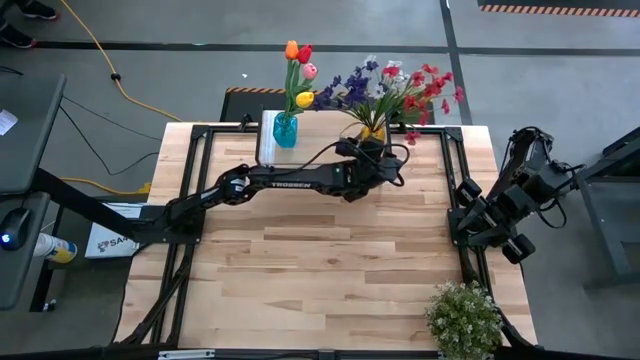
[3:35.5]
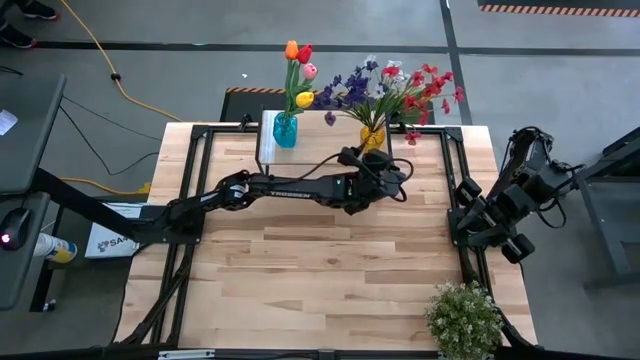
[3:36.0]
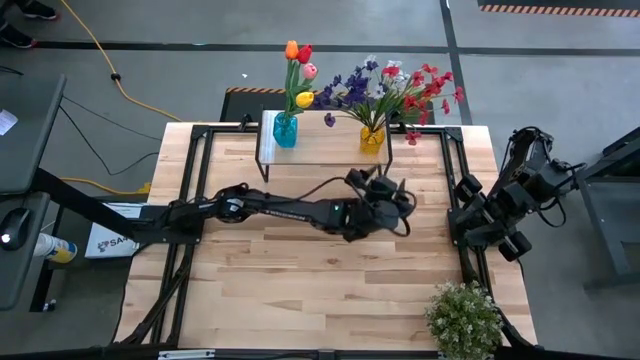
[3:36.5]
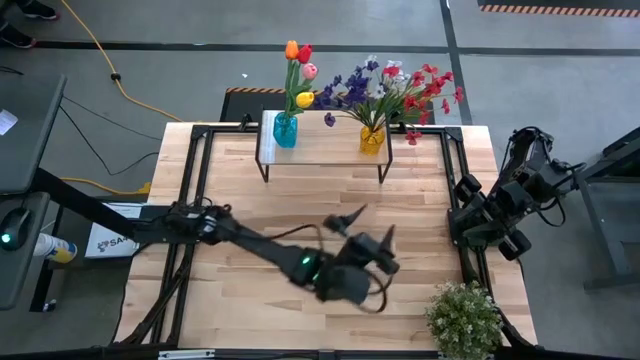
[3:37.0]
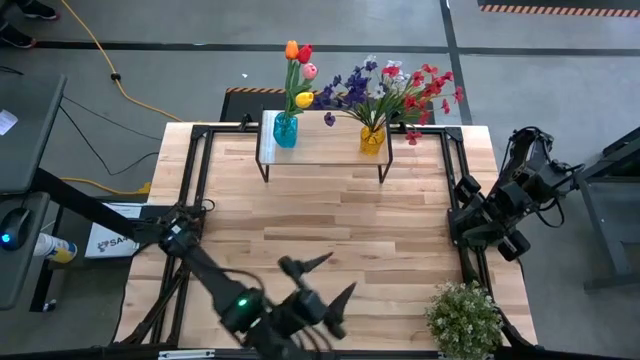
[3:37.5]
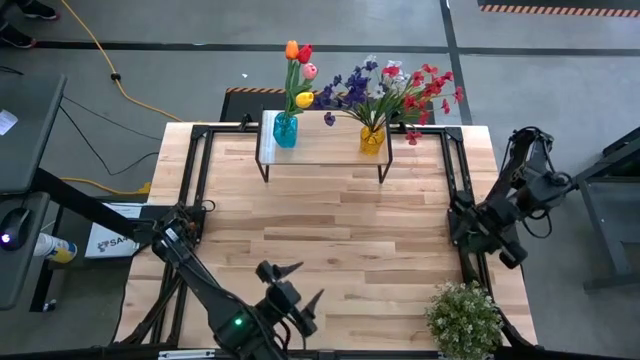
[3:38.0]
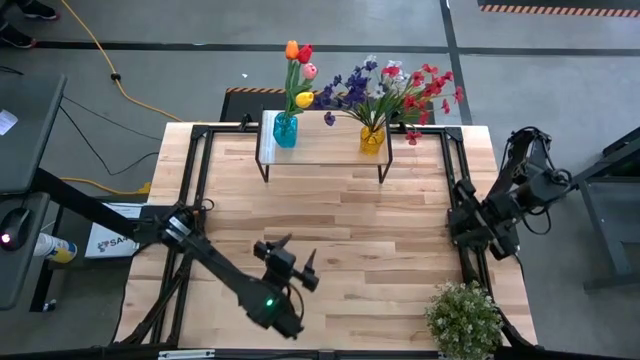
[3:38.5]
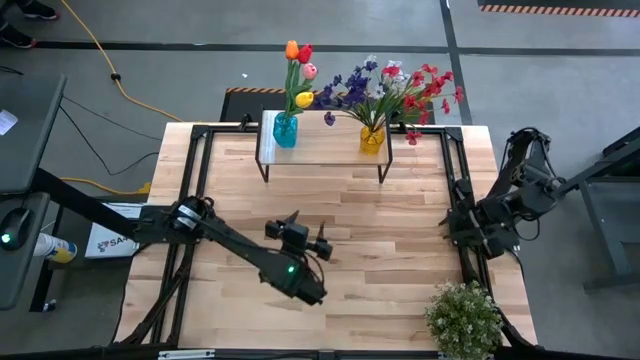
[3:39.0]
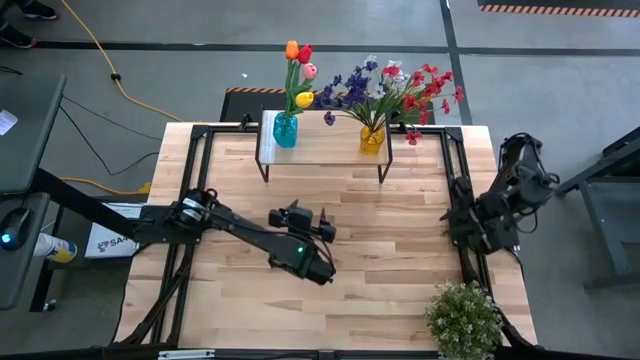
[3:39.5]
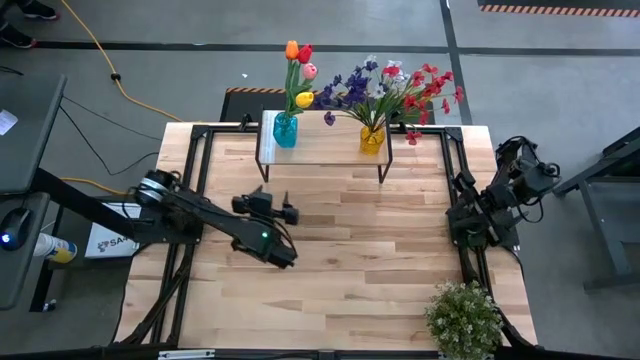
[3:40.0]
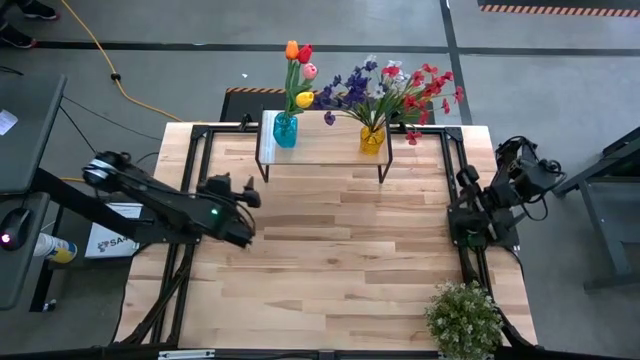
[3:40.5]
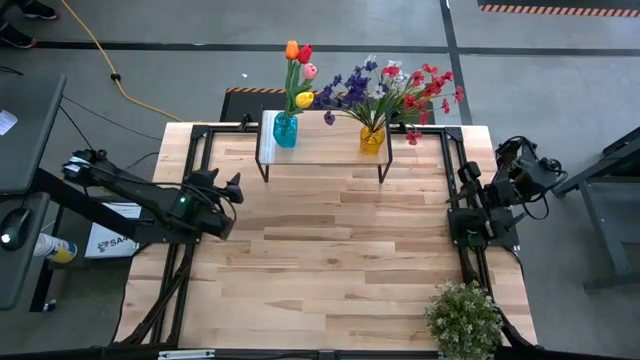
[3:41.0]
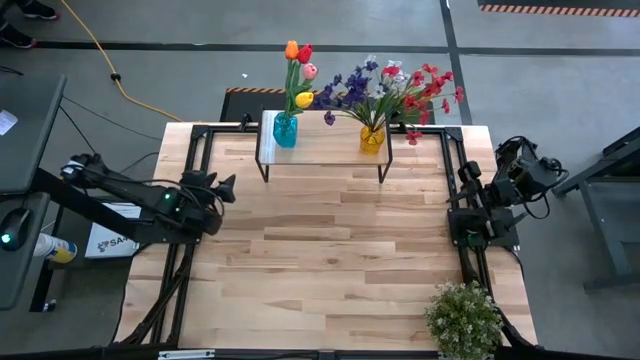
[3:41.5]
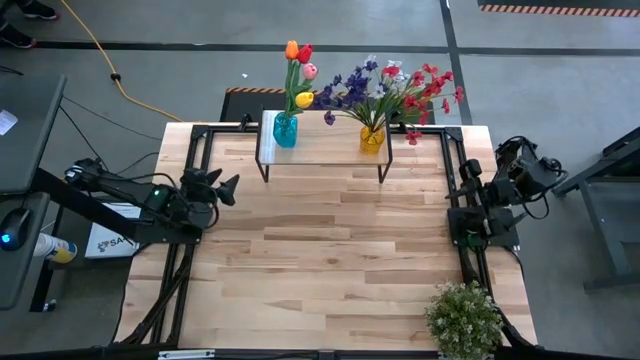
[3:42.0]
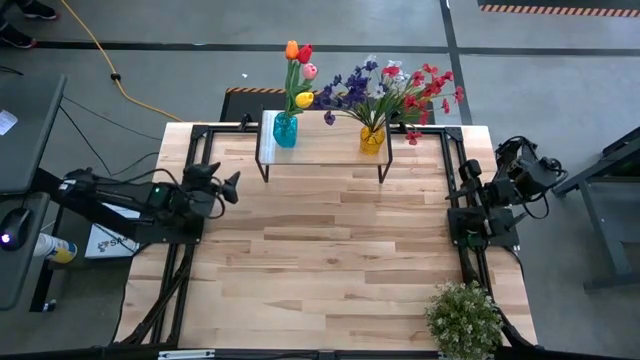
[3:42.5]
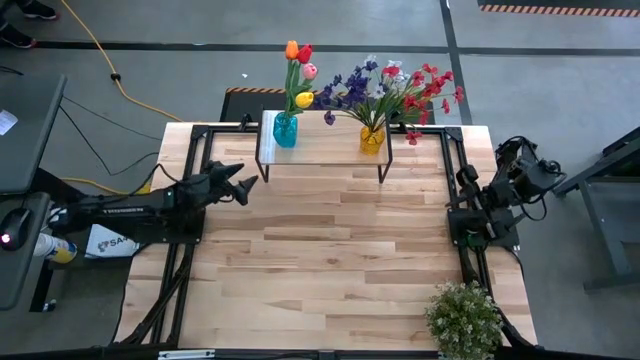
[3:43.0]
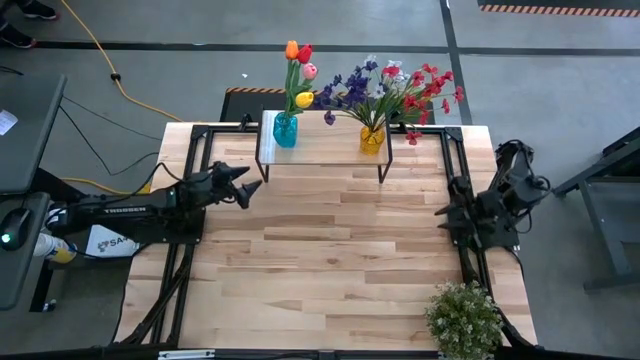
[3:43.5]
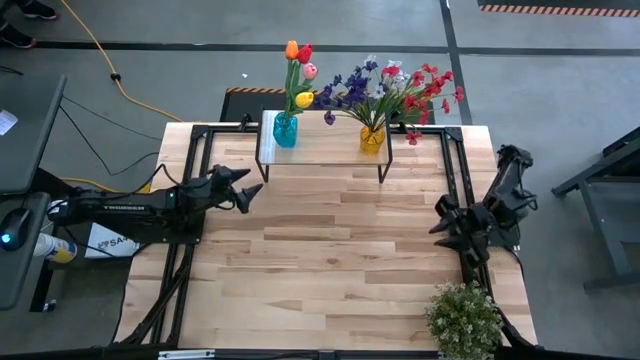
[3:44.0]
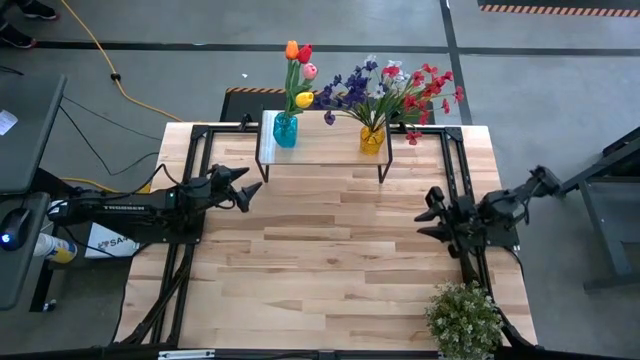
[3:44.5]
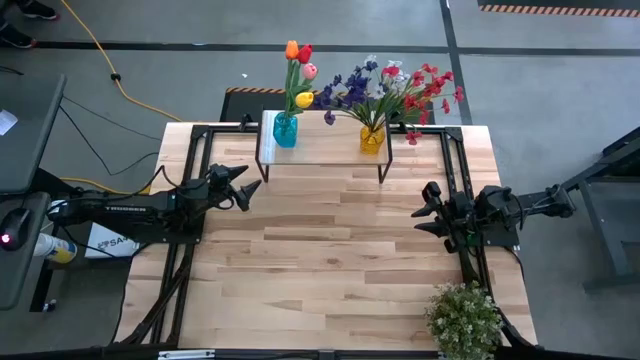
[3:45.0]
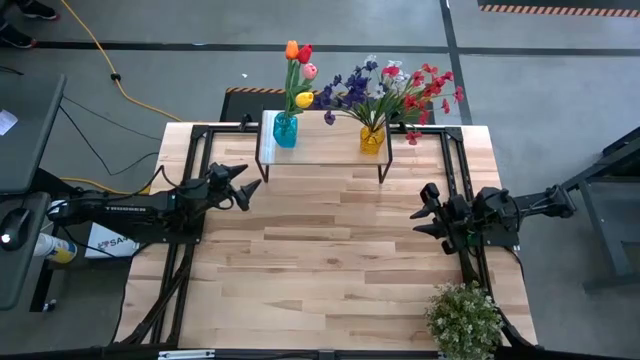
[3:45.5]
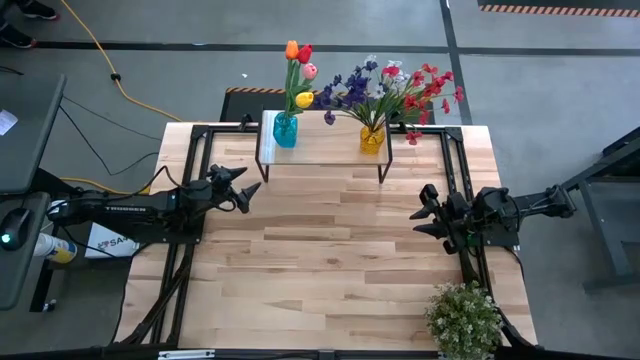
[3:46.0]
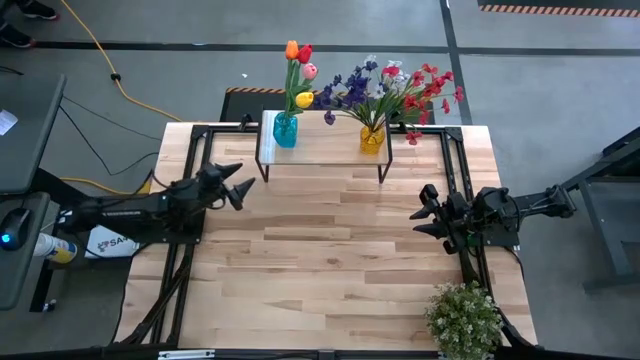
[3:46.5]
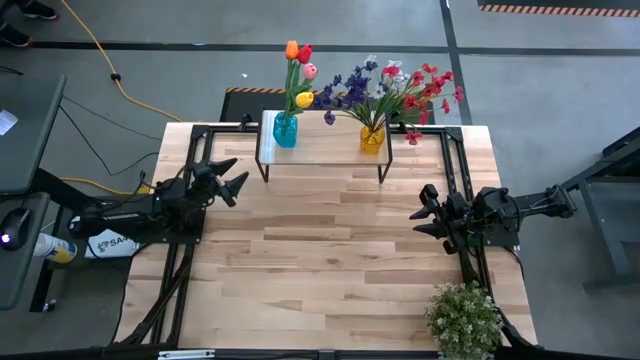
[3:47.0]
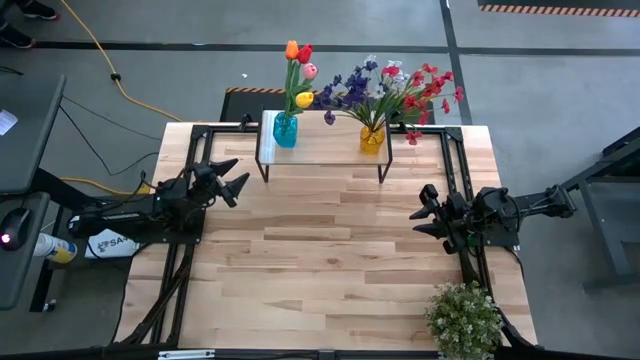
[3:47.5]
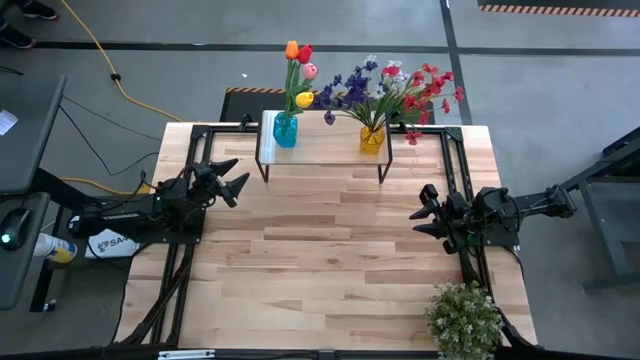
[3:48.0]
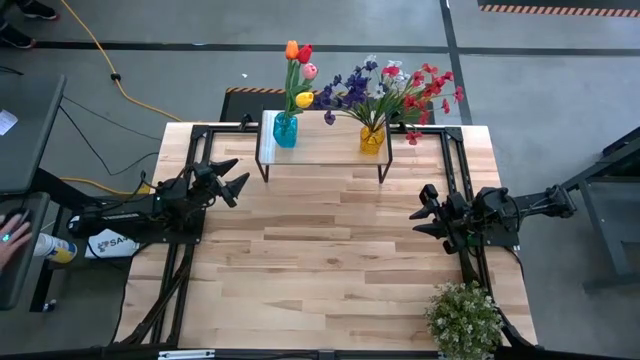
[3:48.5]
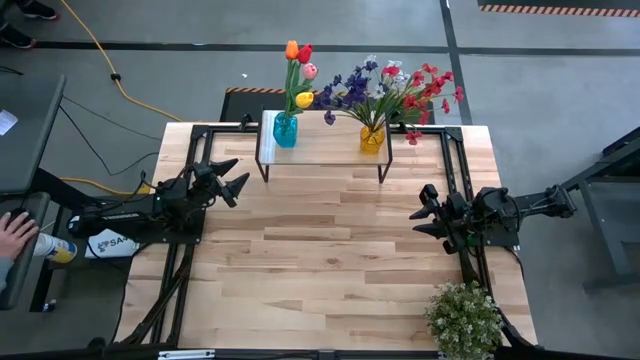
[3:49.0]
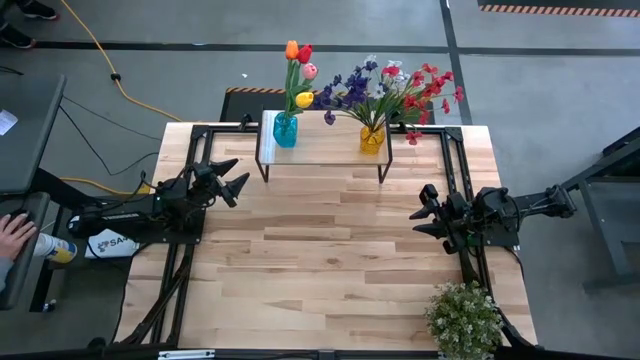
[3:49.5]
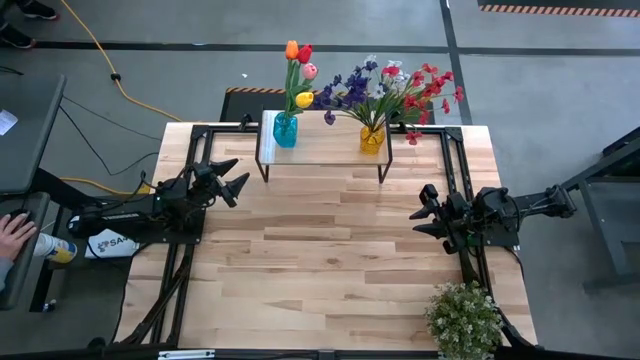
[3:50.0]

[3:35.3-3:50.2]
Task: Pick and place flowers into a vace then onto a shelf
Return to Home Position

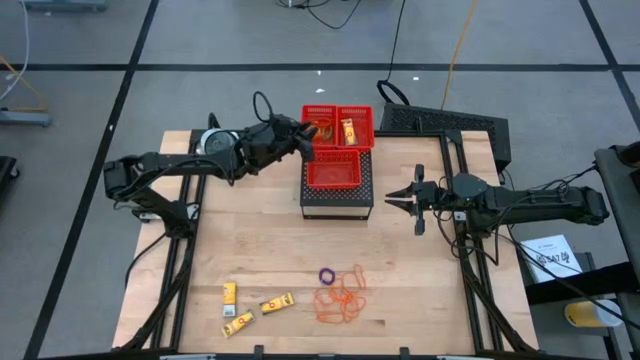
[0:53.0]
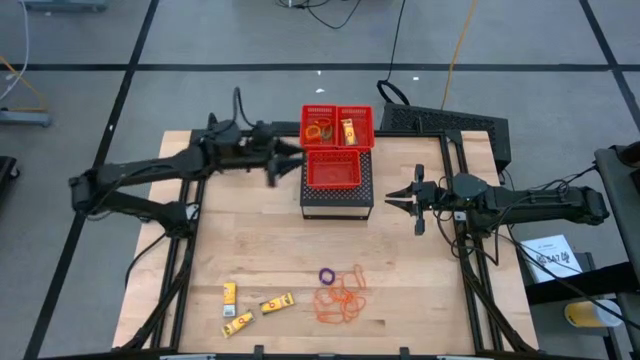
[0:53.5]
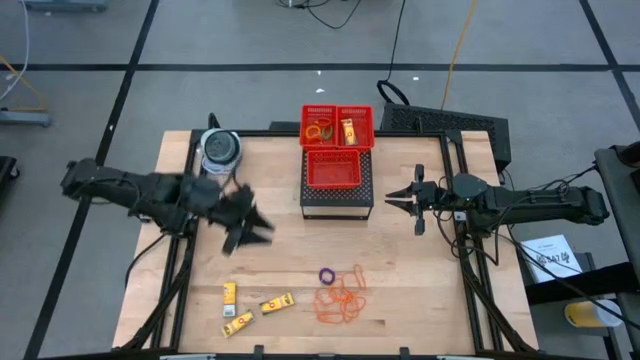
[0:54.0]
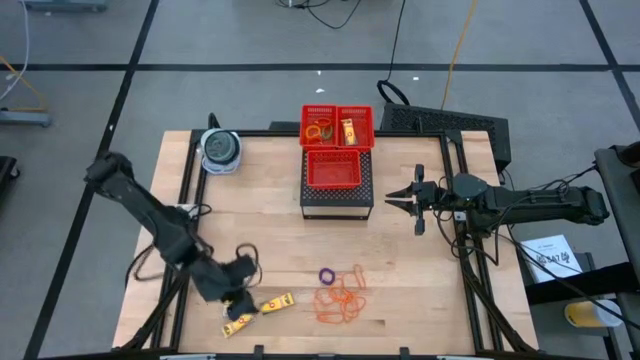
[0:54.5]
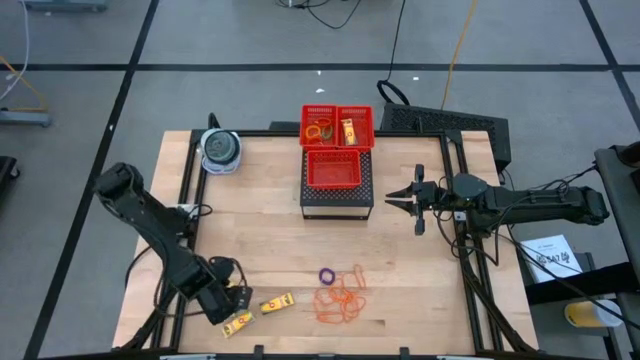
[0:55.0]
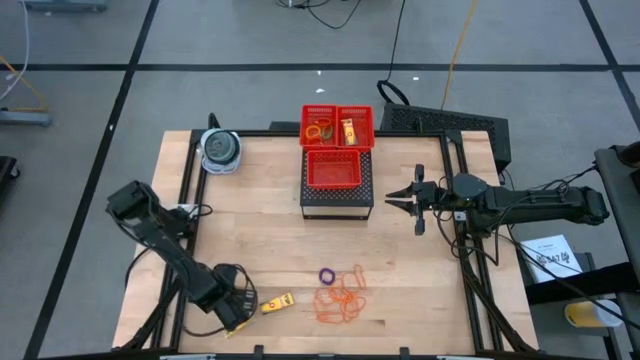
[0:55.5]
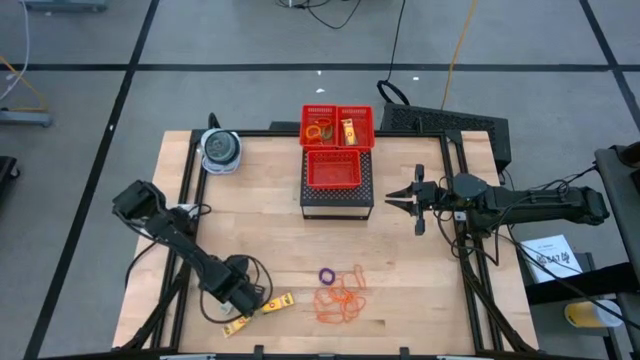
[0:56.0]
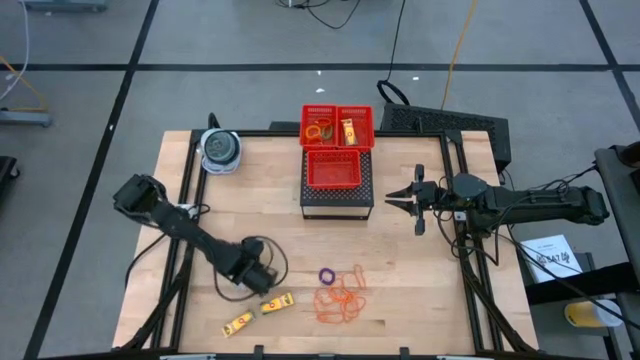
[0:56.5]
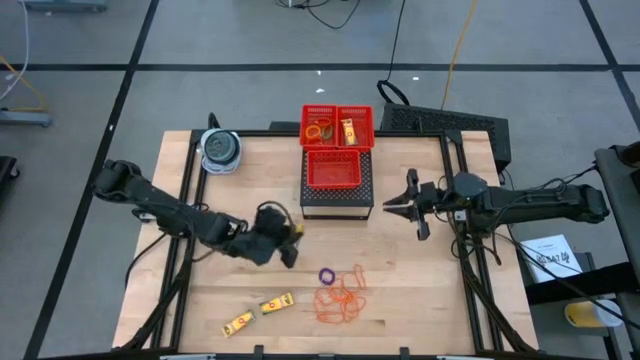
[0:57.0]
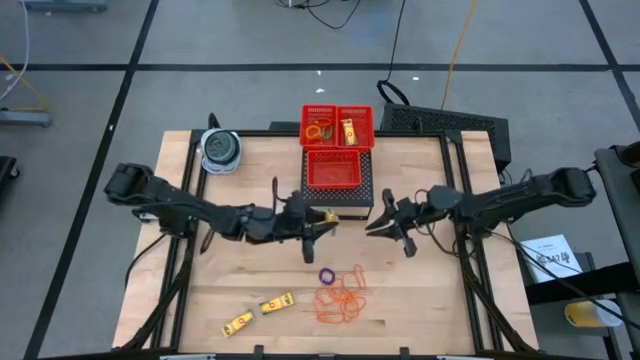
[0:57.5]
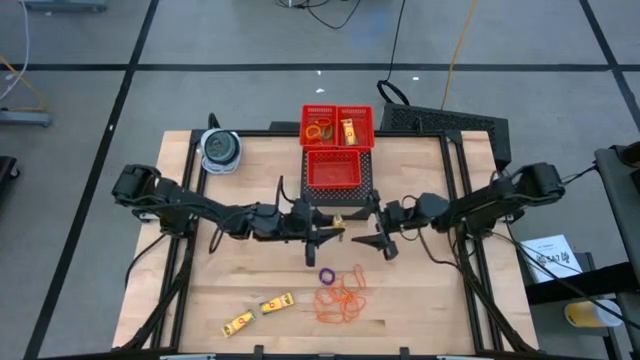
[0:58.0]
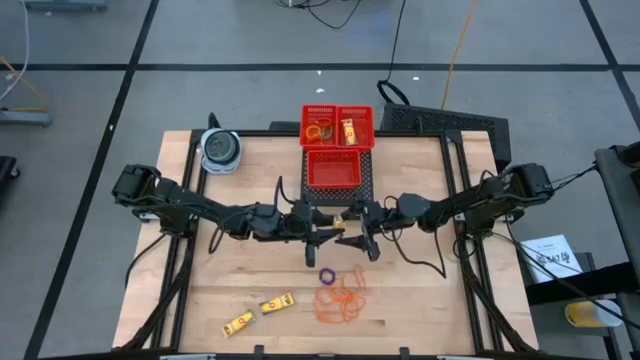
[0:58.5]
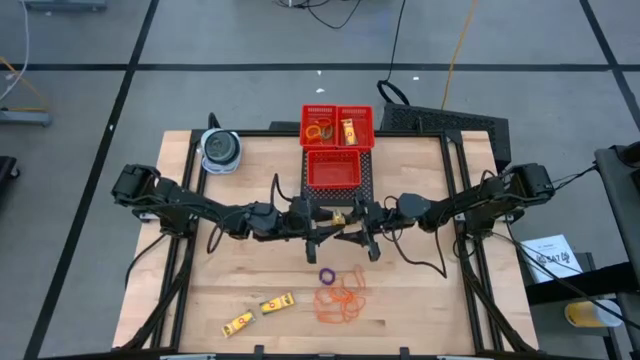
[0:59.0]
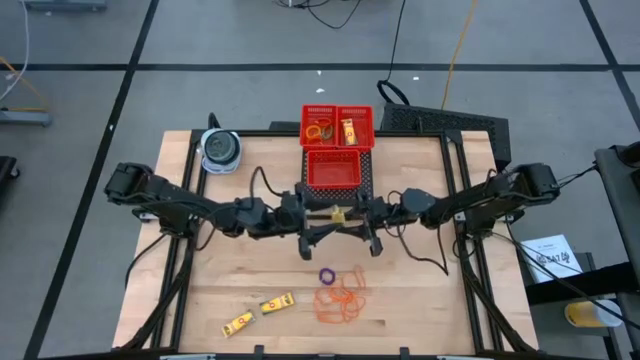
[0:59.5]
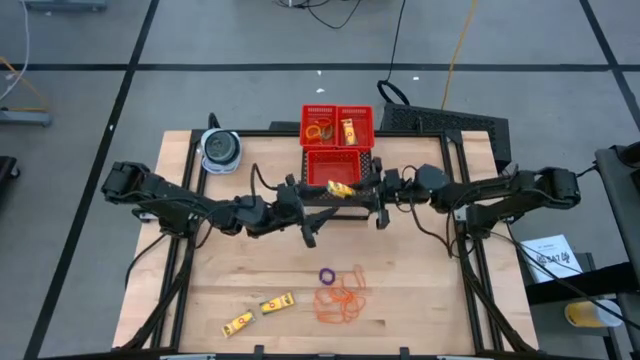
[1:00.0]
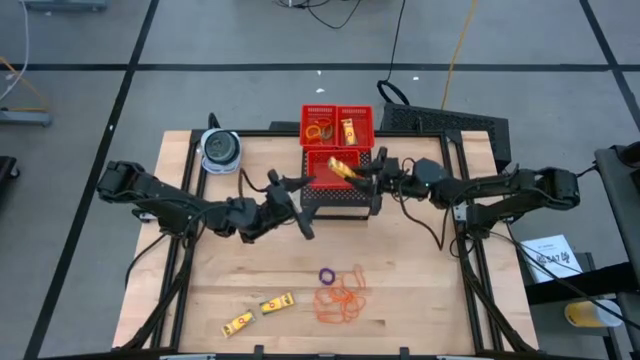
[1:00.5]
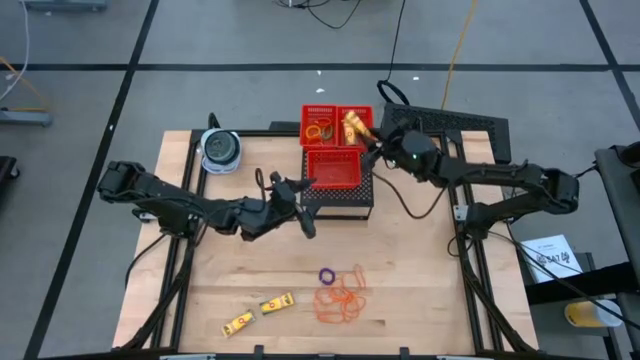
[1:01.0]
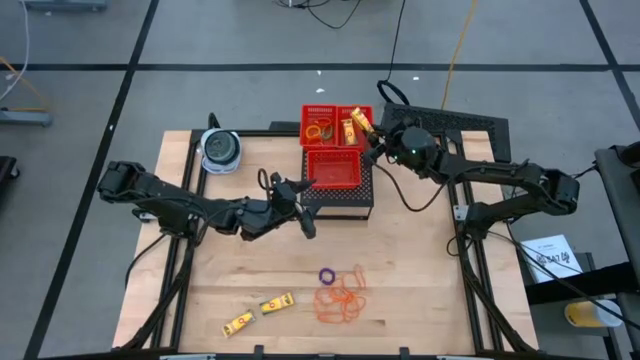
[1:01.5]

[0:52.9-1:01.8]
Task: Pick & Place Office Desk Supplies
Put the yellow pack of crayon in the top right red bin on the shelf
